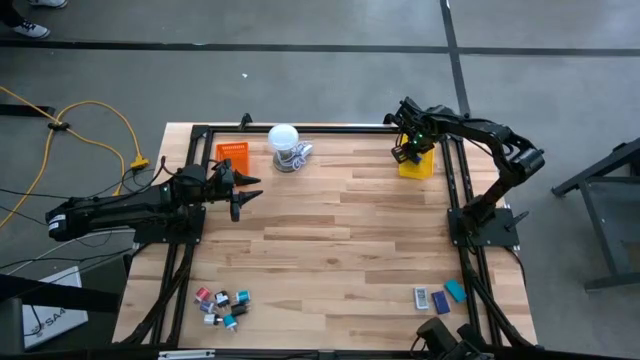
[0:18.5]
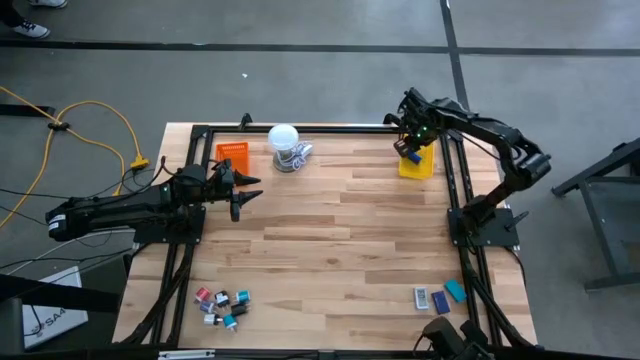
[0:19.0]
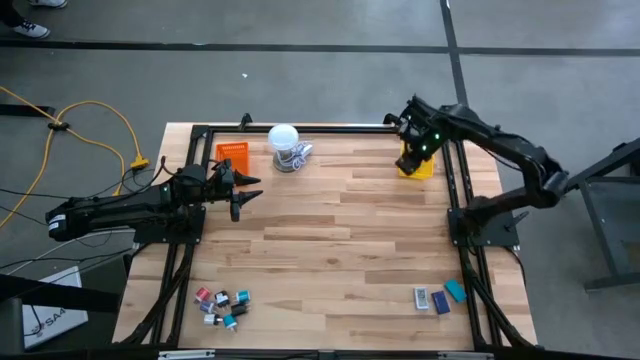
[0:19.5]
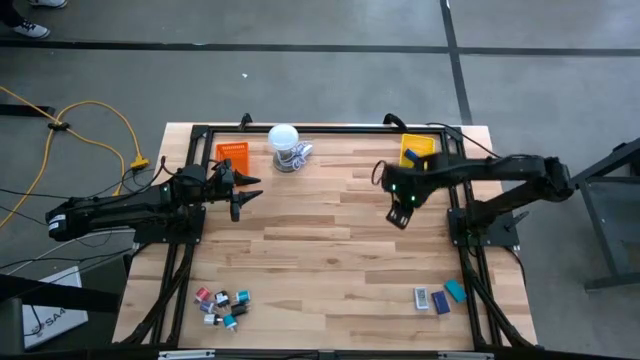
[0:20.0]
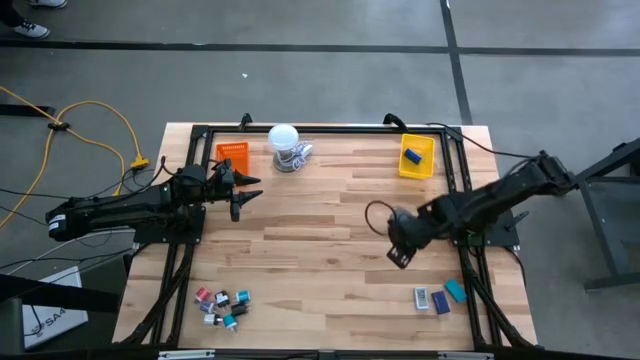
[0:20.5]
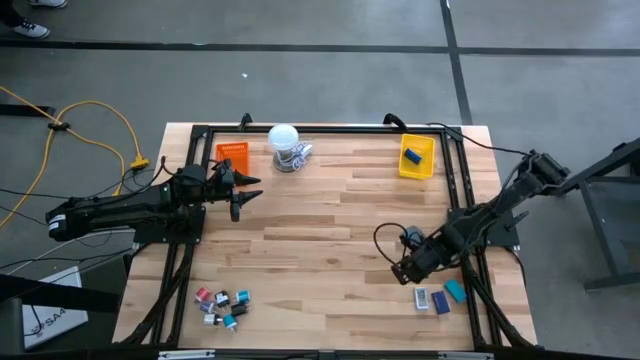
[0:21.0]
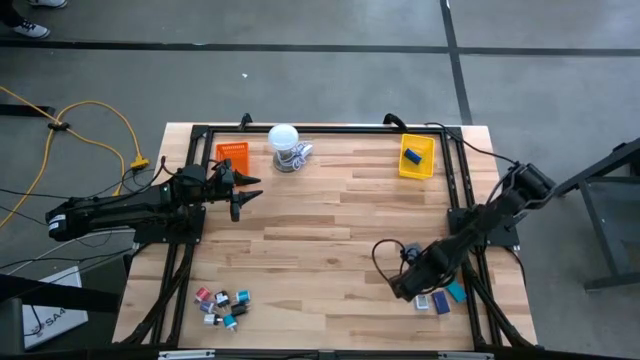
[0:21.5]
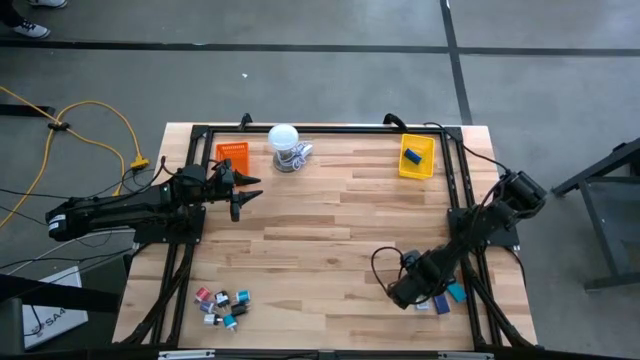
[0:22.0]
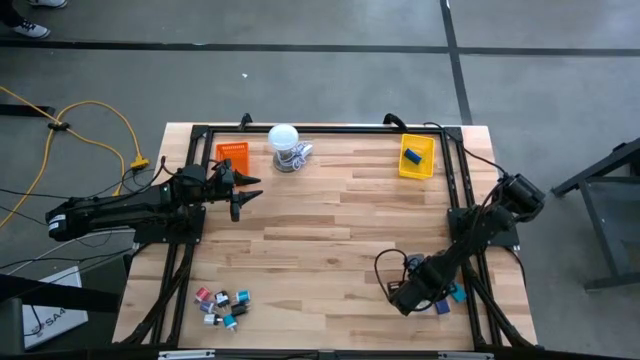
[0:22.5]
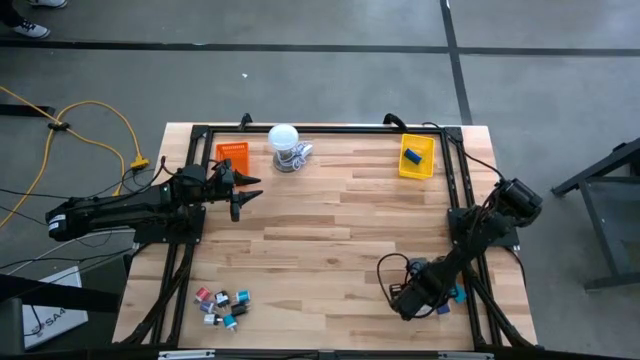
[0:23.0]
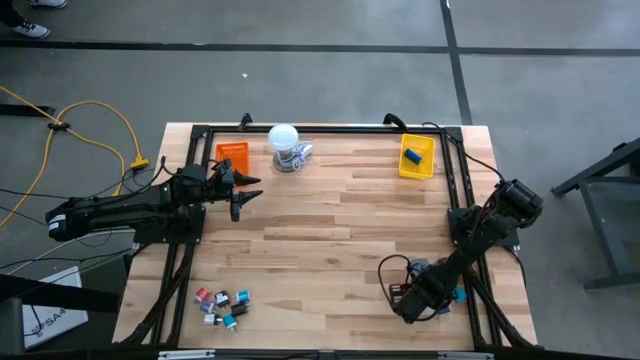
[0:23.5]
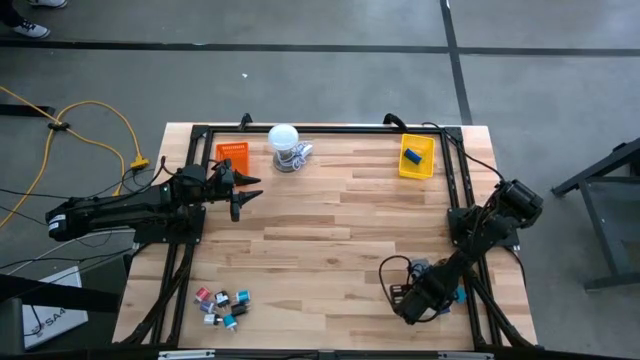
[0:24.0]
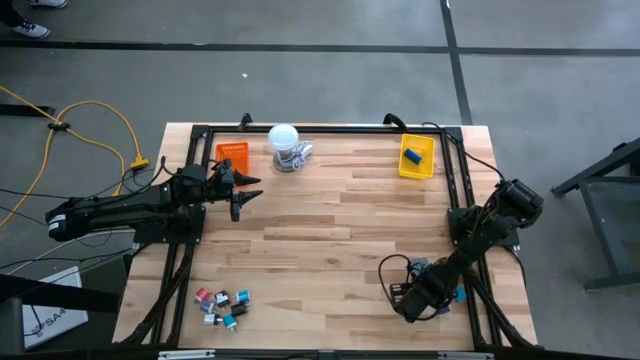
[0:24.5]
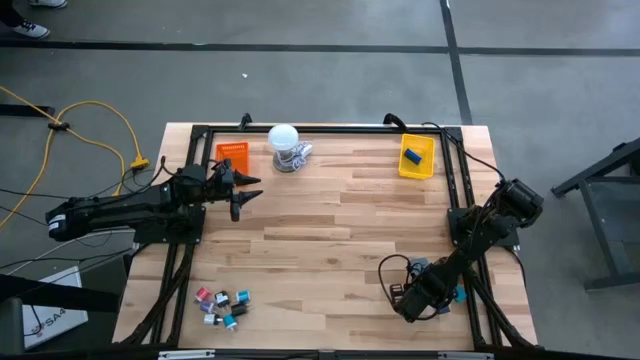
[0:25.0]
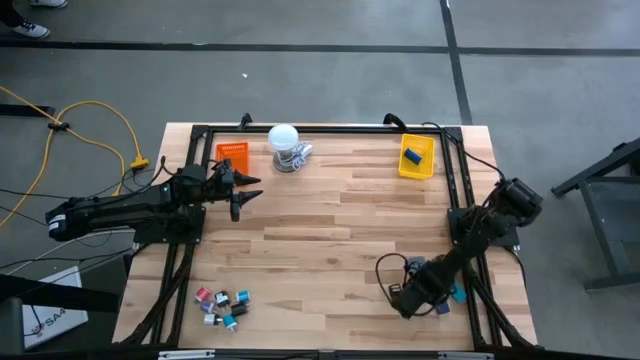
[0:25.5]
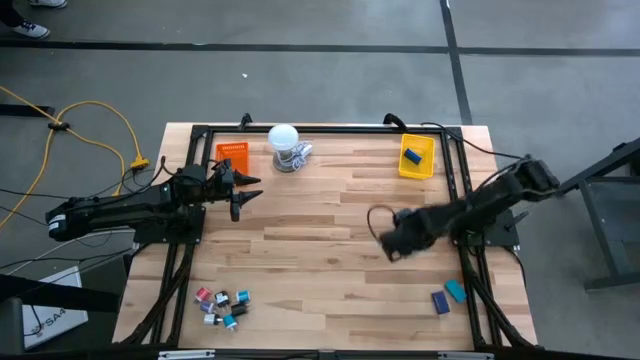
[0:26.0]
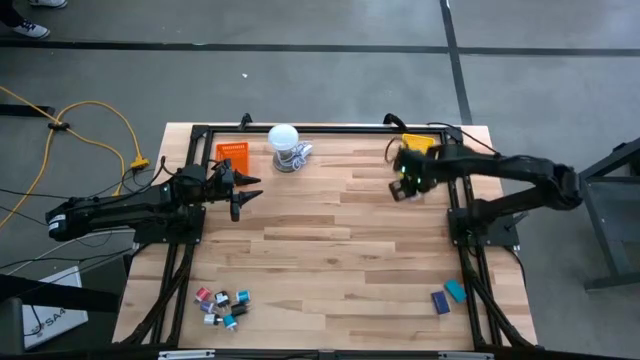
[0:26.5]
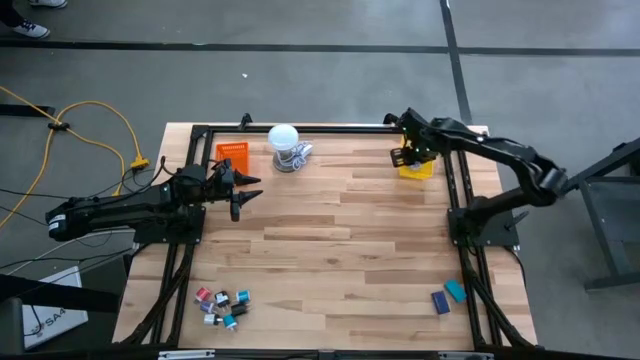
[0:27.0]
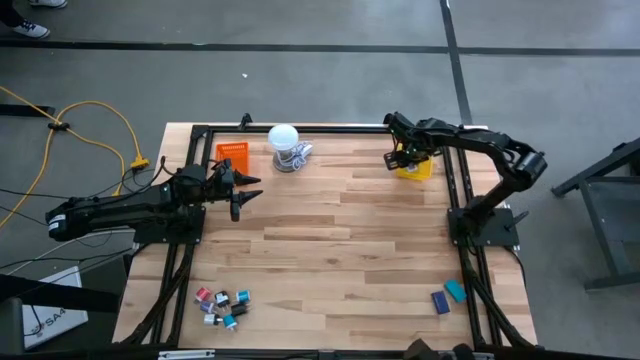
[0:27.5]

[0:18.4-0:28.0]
Task: Pick & Place Office items
Put the white digital timer into the yellow basket

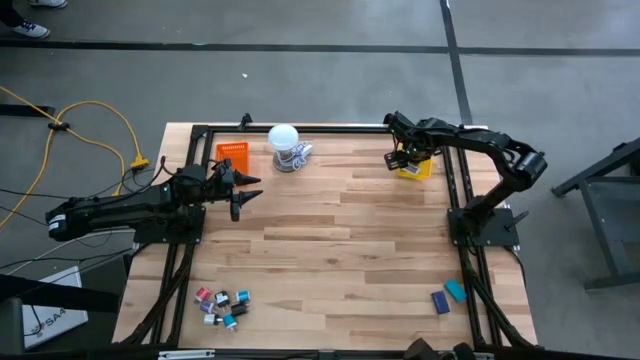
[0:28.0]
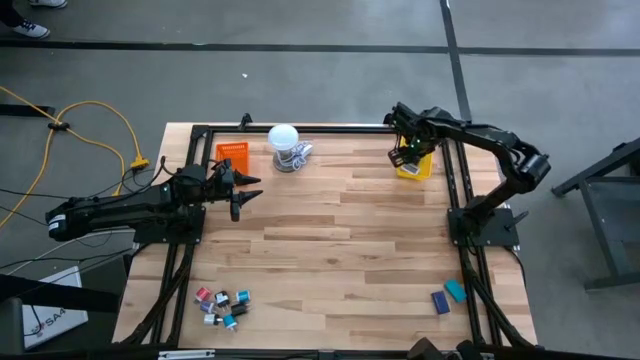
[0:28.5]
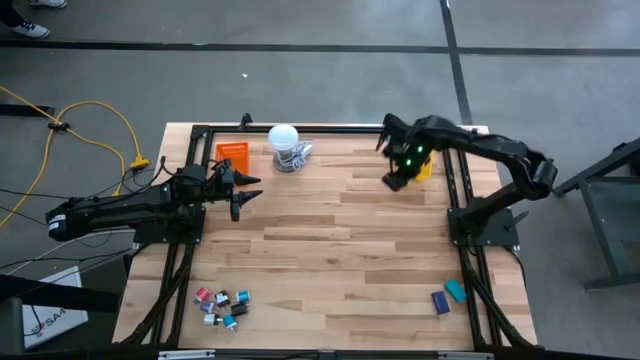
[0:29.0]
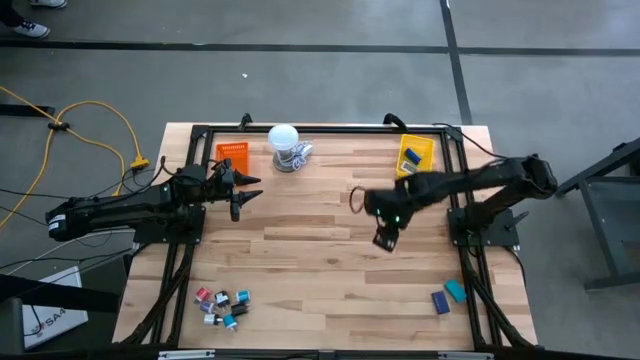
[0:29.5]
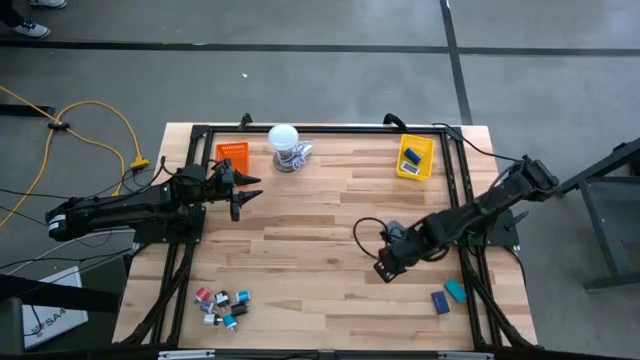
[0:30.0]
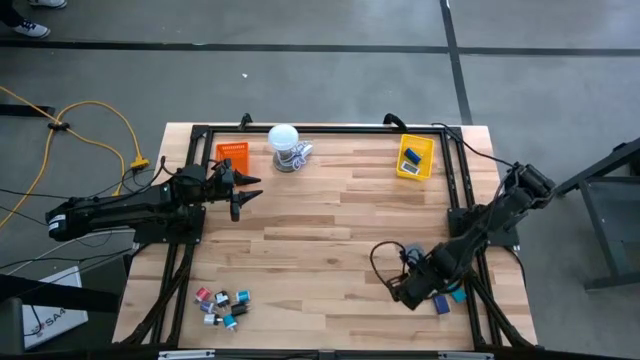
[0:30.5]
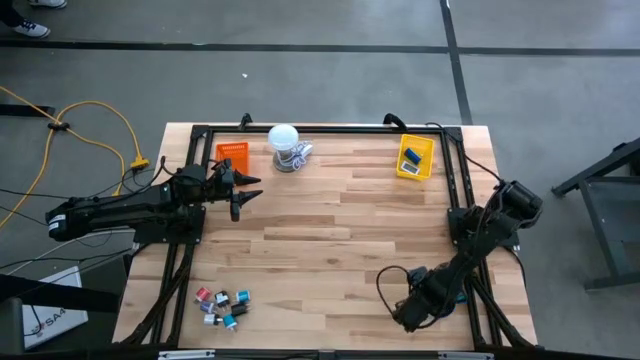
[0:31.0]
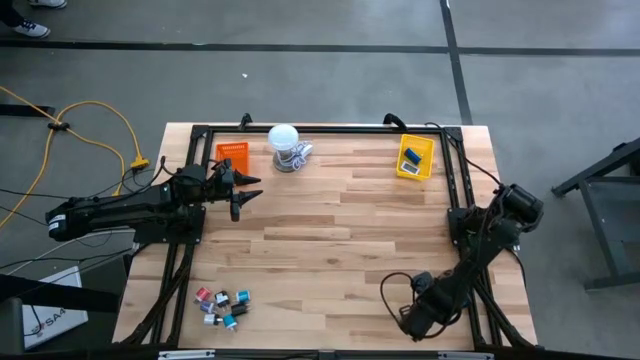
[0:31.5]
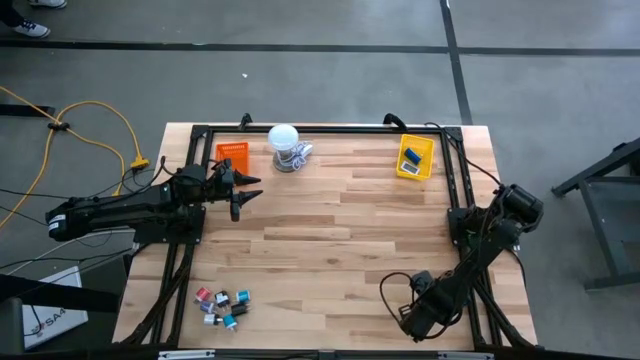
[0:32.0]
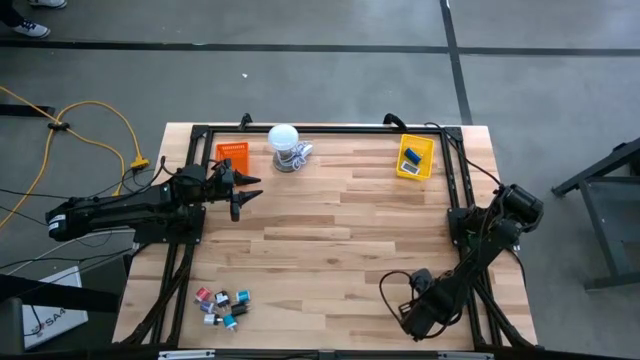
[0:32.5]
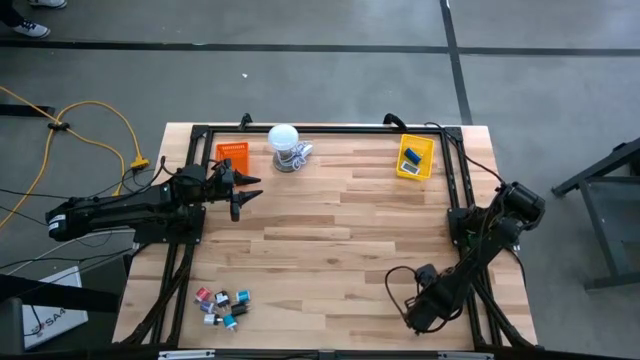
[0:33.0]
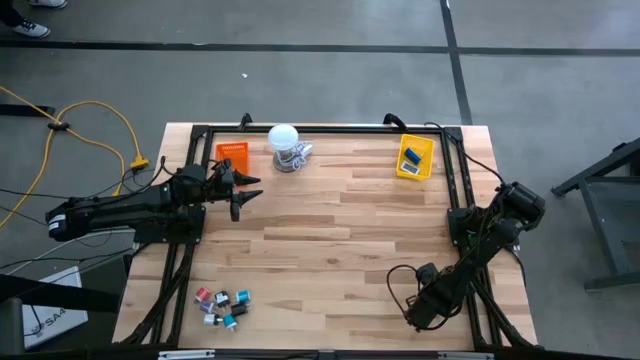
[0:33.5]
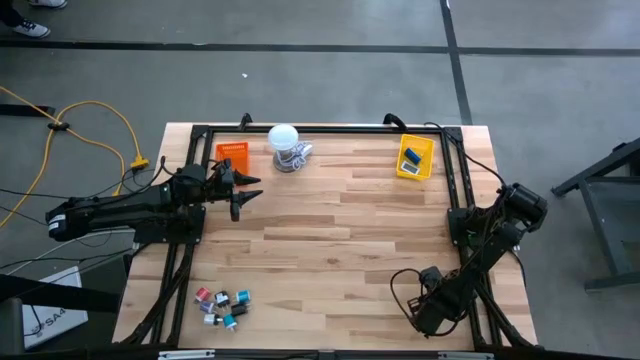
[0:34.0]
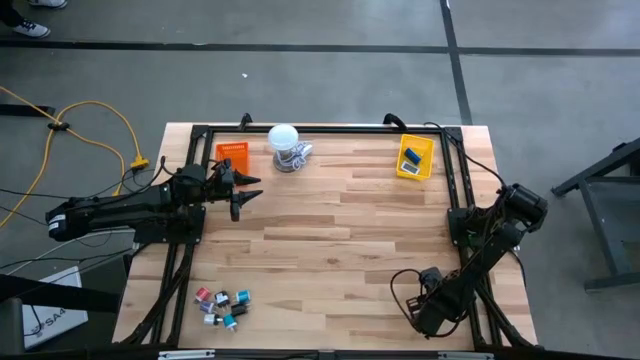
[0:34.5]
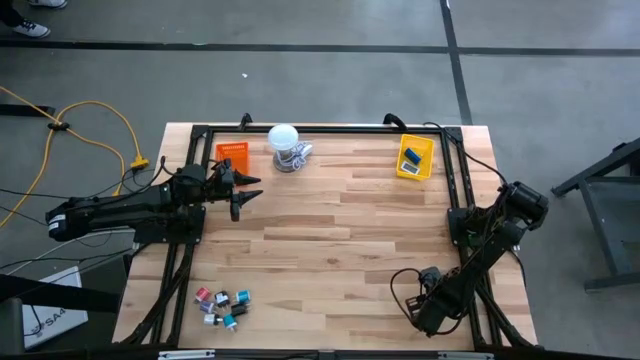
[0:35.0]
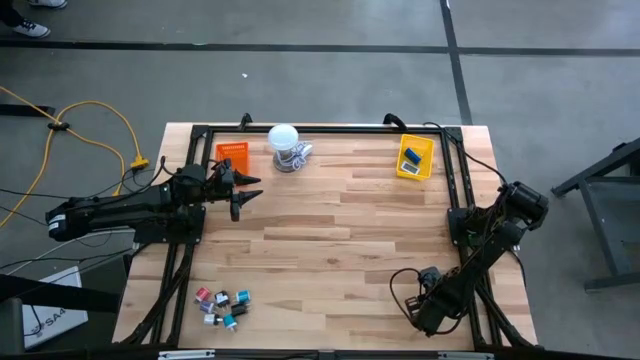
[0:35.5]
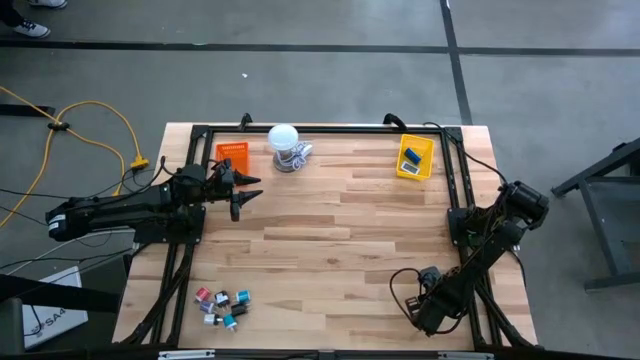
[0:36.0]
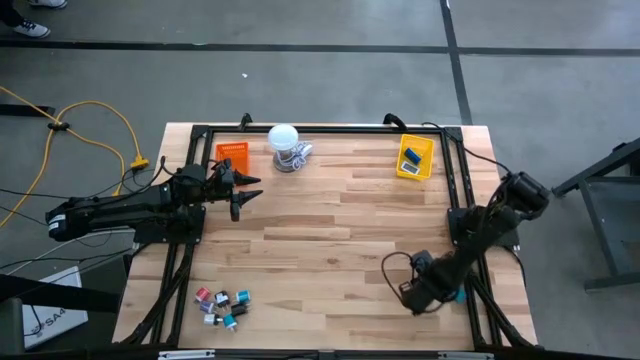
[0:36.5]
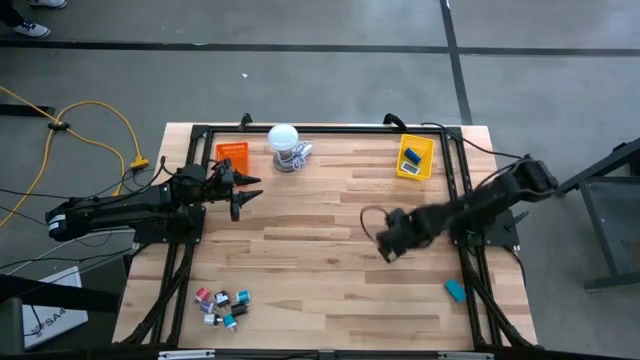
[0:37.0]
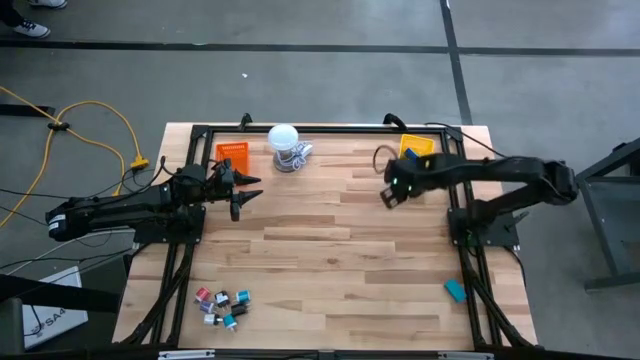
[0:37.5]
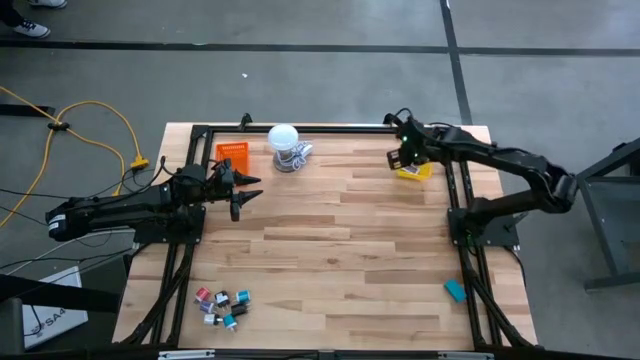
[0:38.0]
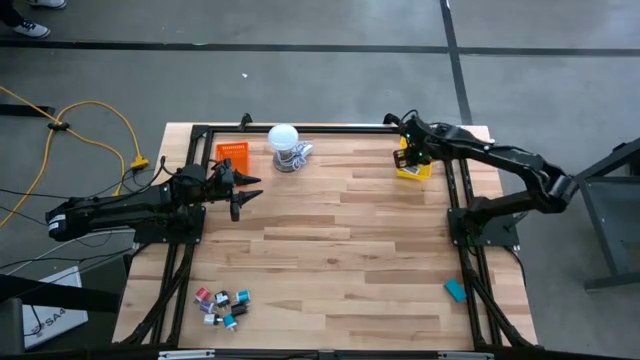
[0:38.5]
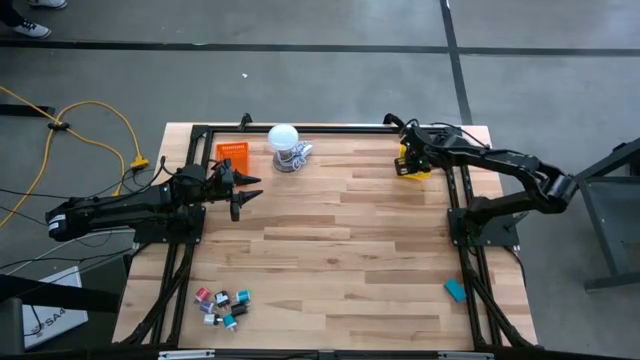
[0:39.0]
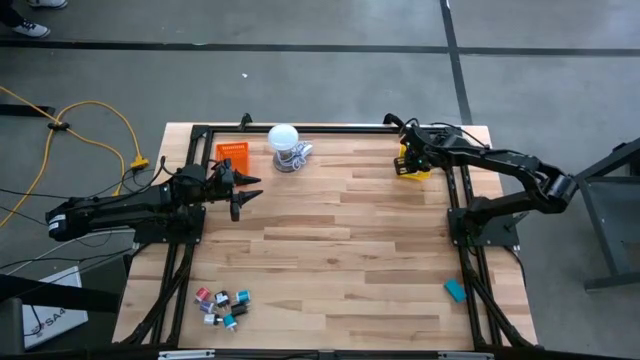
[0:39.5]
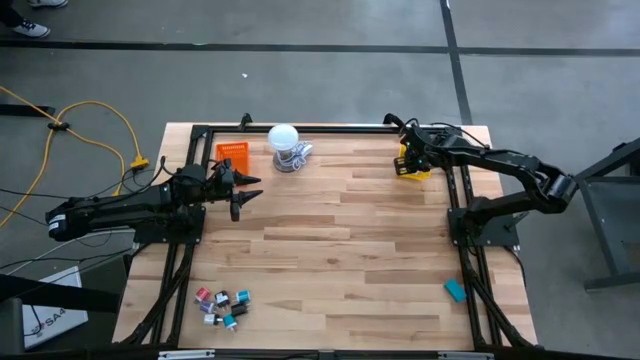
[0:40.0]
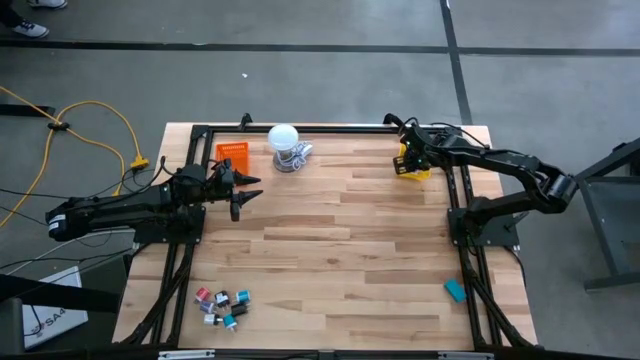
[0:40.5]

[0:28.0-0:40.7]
Put the blue digital timer into the yellow basket
